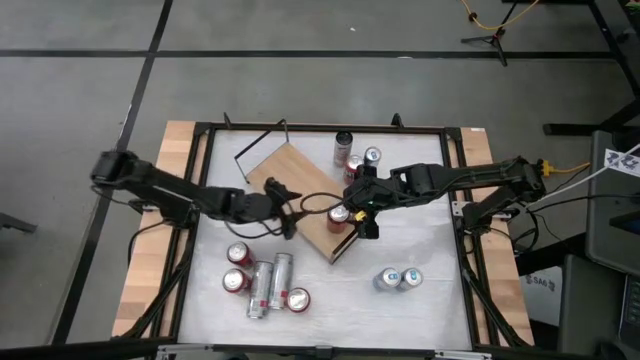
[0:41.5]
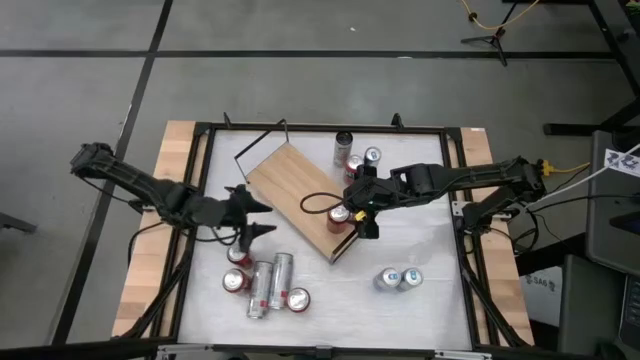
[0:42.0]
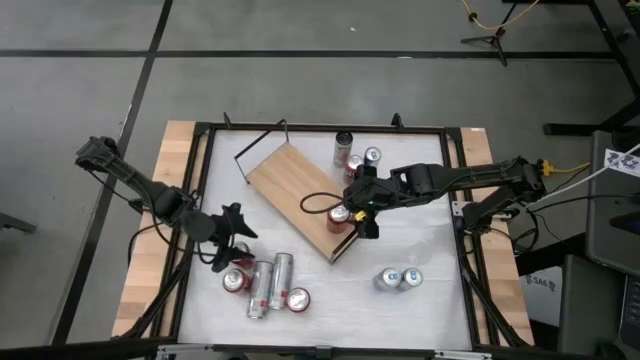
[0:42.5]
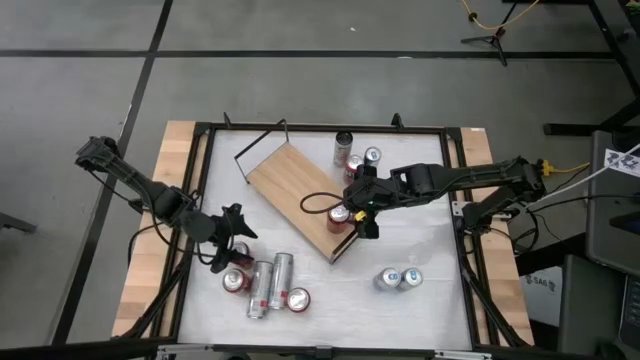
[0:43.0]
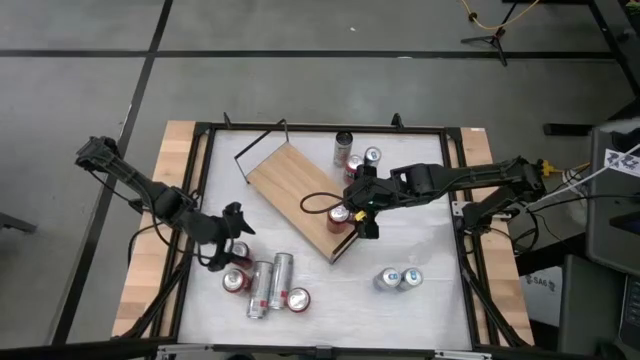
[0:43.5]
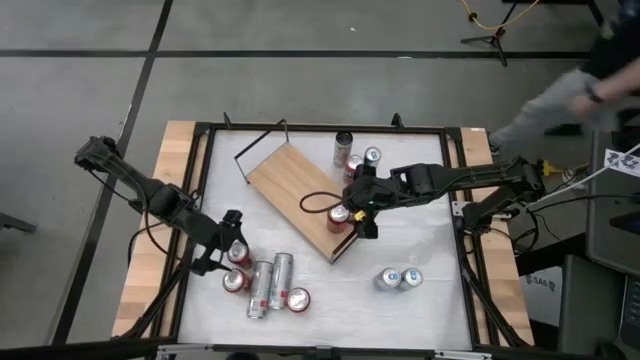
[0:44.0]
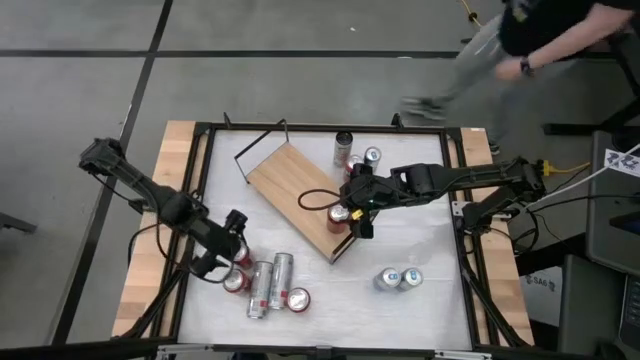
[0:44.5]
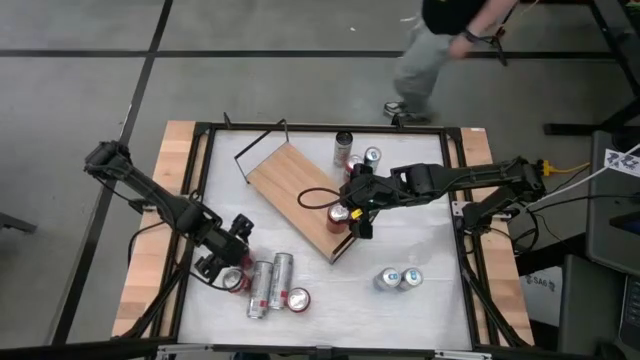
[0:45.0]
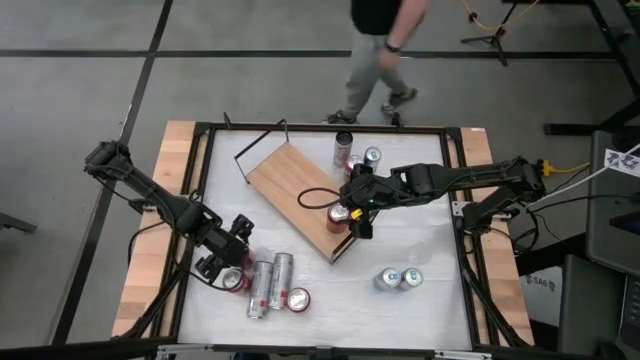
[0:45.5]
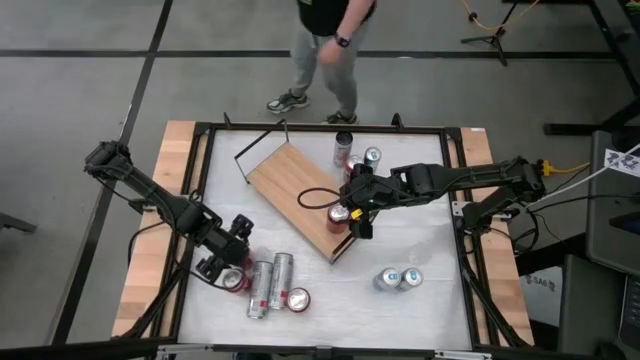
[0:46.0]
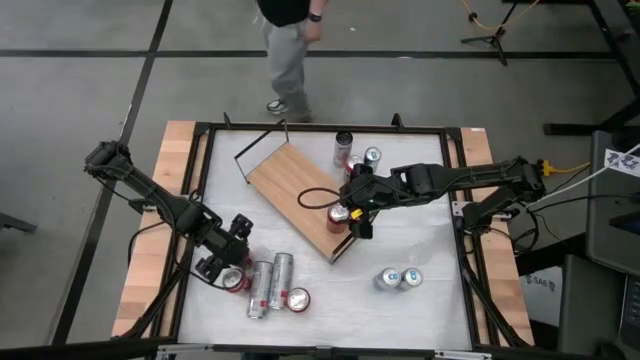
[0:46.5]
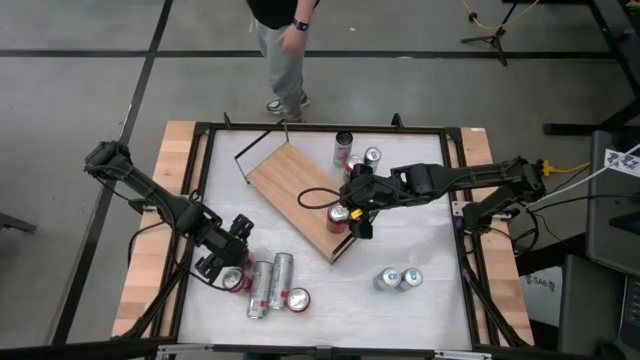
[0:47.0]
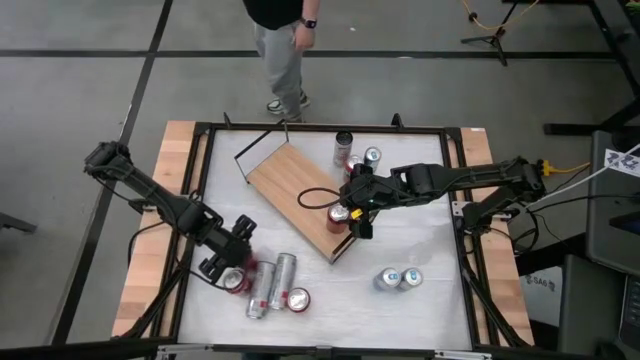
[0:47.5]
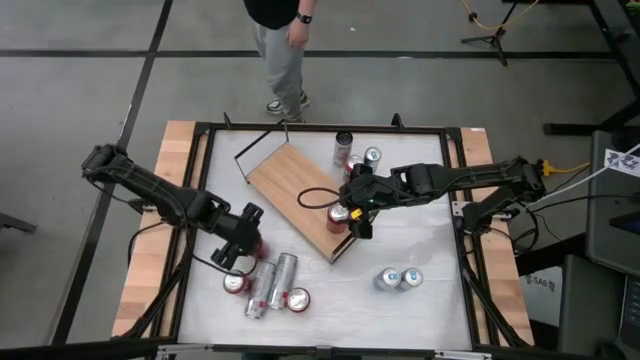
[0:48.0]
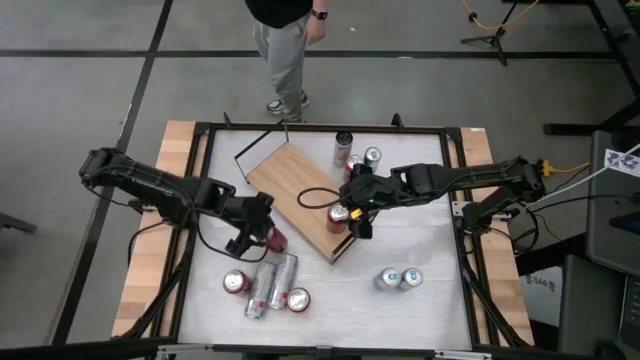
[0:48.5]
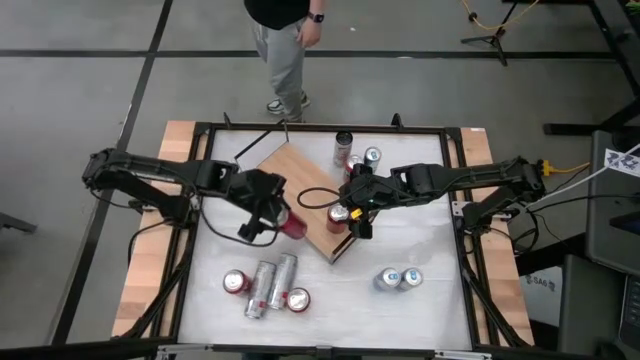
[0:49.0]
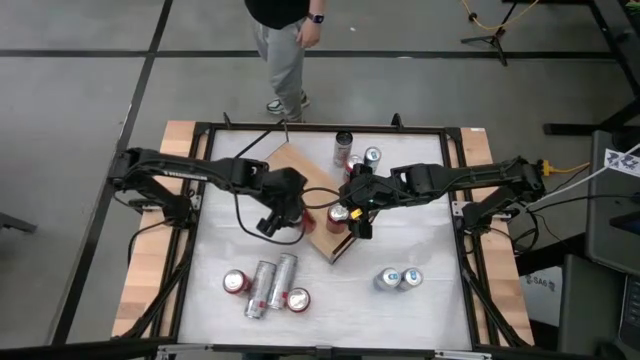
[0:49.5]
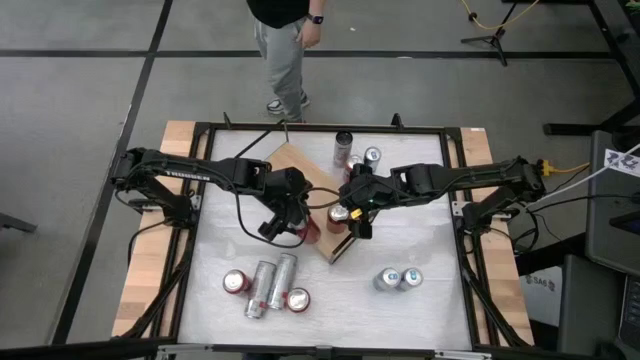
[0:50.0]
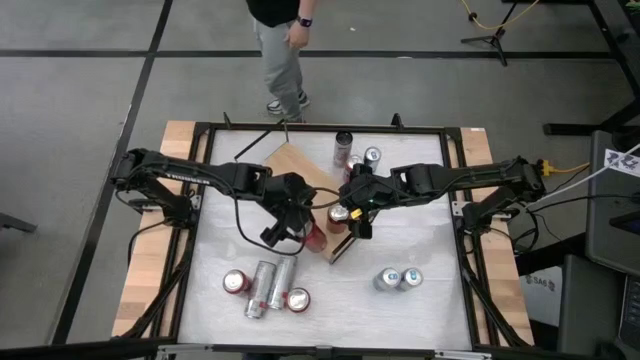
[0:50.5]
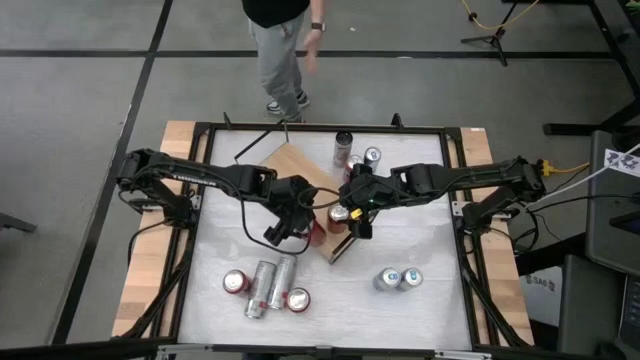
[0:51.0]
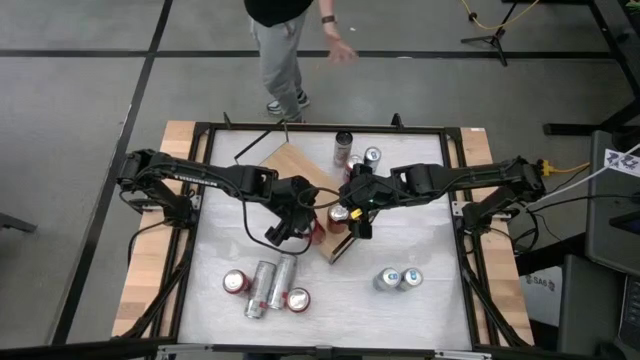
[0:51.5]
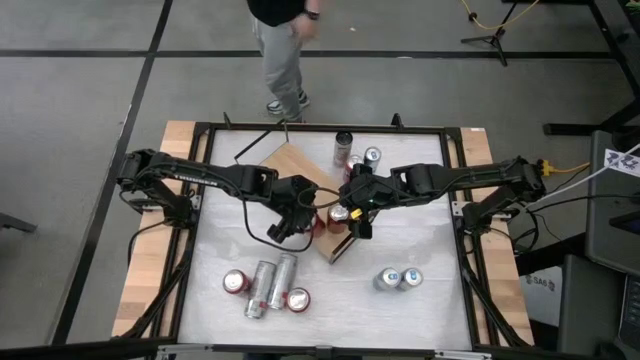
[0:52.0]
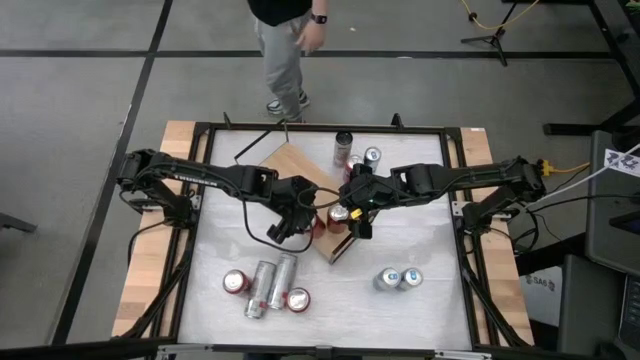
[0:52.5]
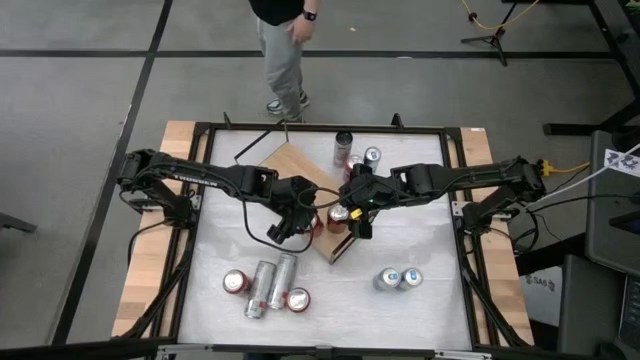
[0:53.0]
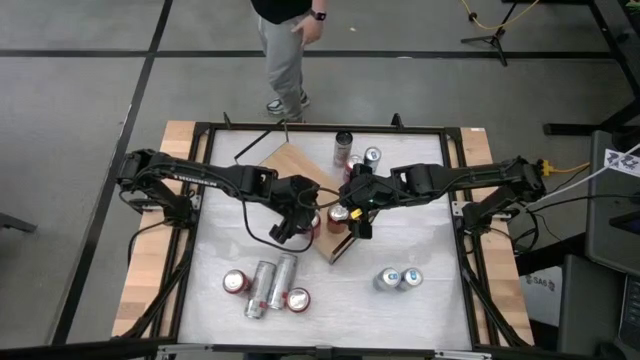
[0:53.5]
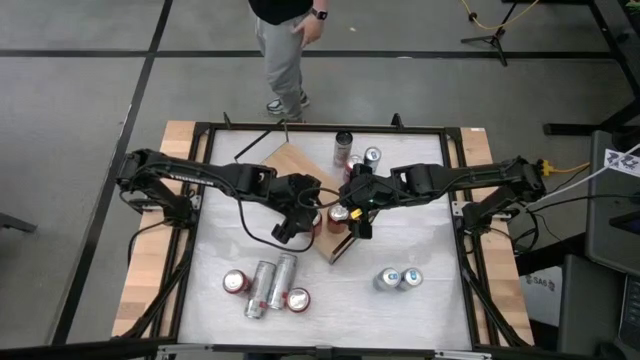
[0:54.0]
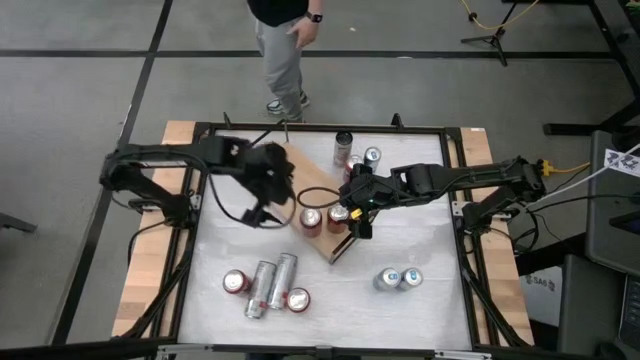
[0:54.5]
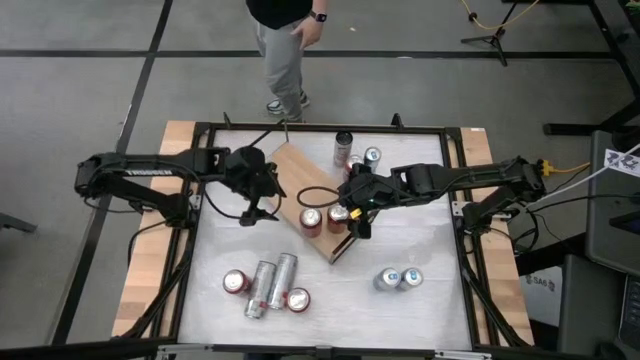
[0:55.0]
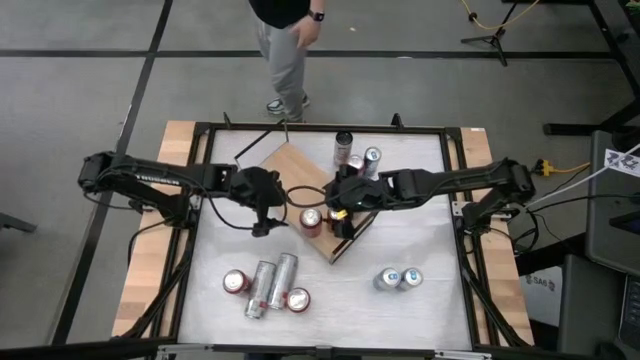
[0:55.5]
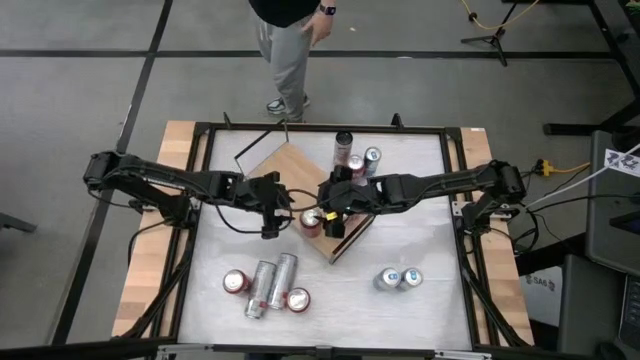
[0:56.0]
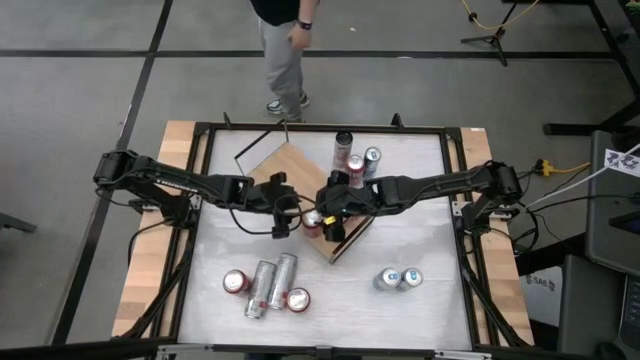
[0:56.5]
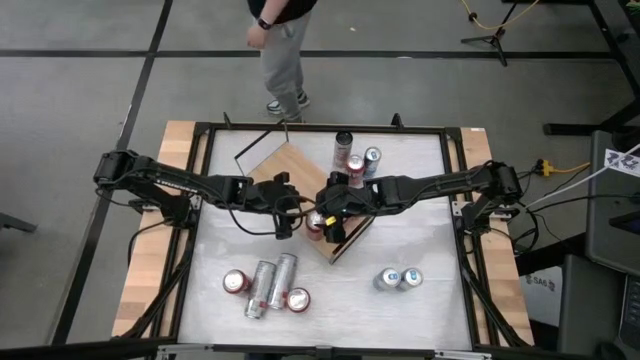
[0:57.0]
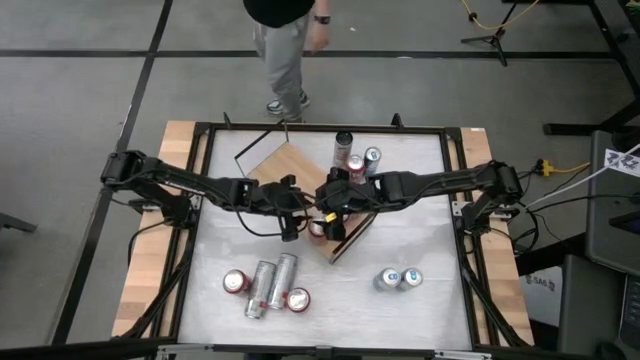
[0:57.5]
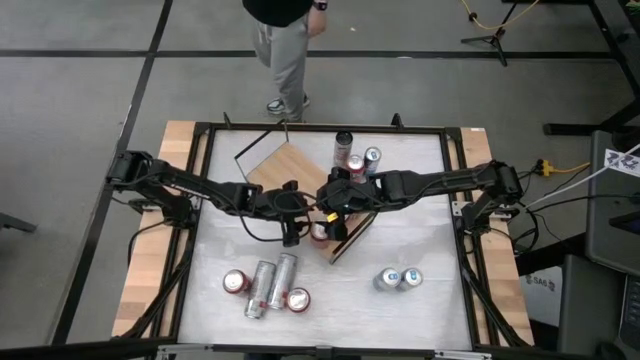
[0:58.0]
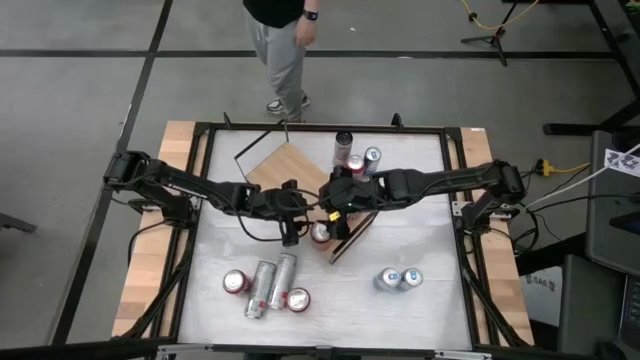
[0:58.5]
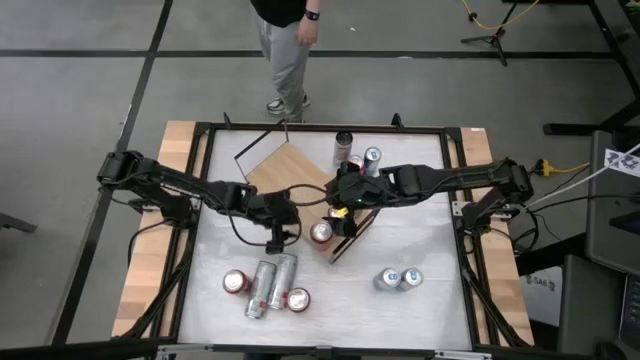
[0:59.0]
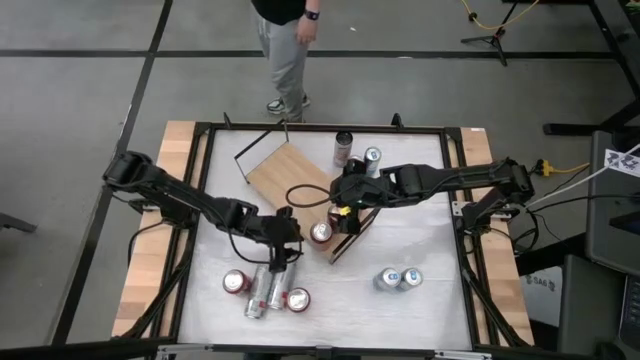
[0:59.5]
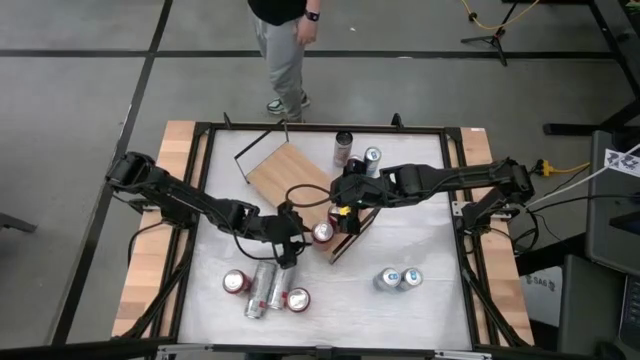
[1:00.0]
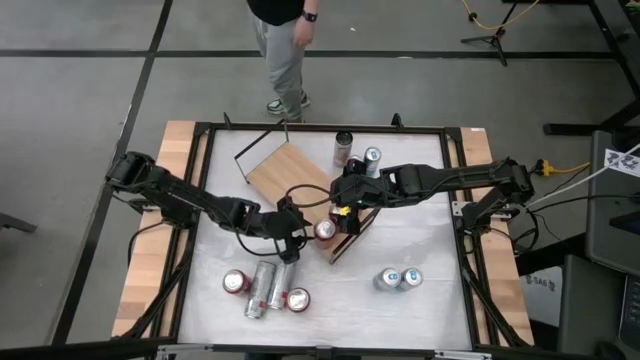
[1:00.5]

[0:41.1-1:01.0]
Task: Place canned beverage on shelf
Put the red black soda can on the shelf aligned with the other red black soda can
